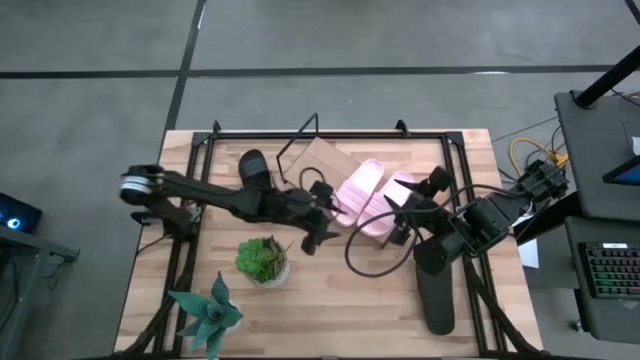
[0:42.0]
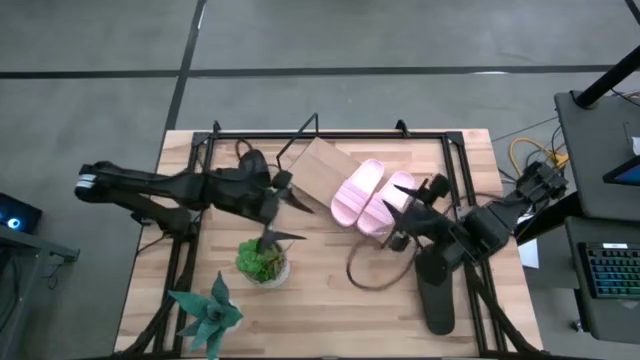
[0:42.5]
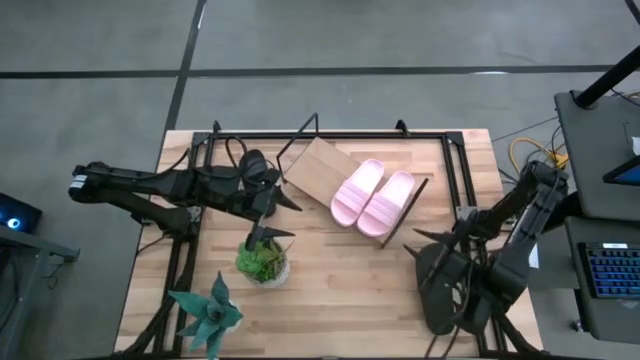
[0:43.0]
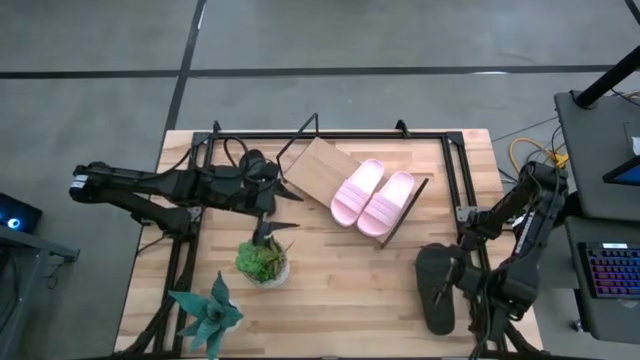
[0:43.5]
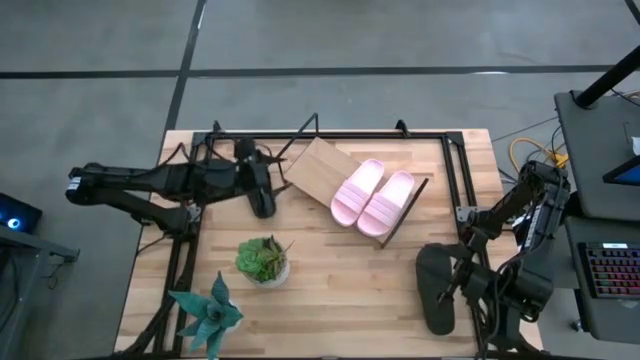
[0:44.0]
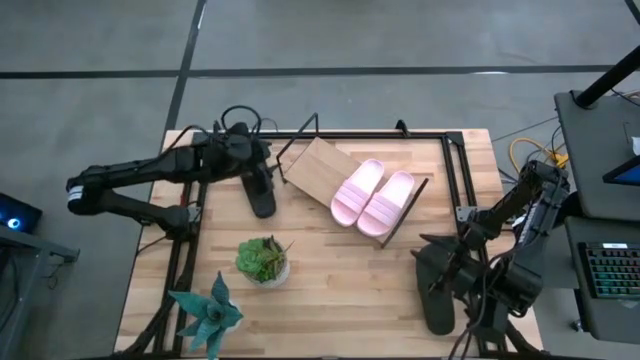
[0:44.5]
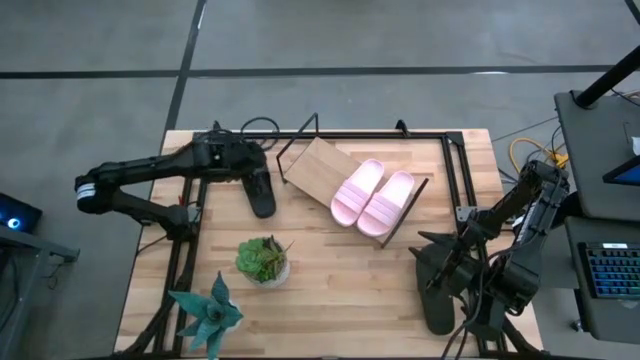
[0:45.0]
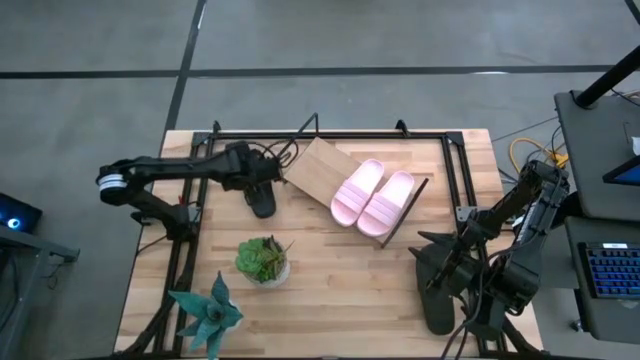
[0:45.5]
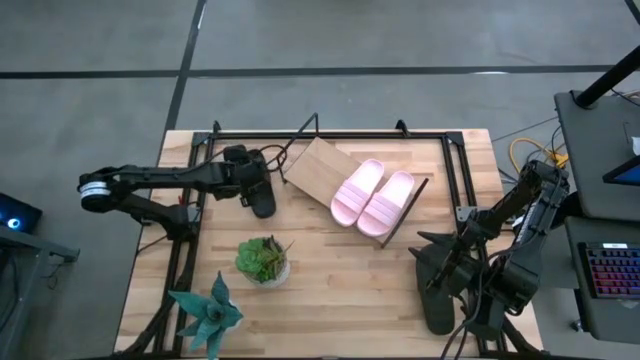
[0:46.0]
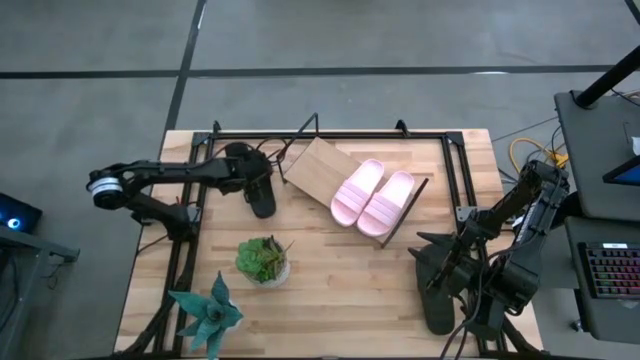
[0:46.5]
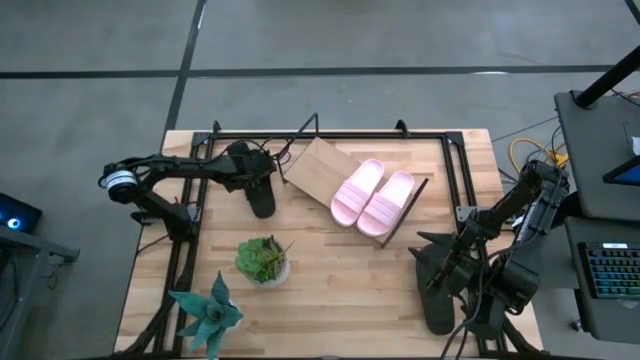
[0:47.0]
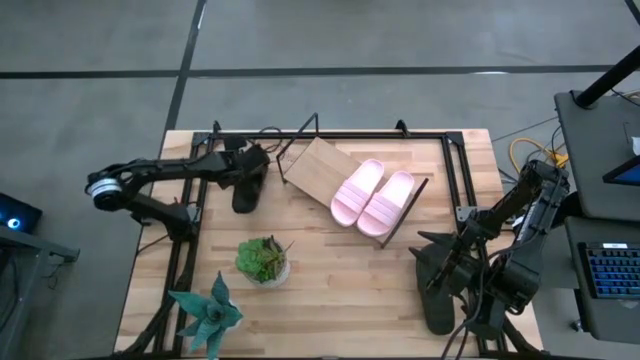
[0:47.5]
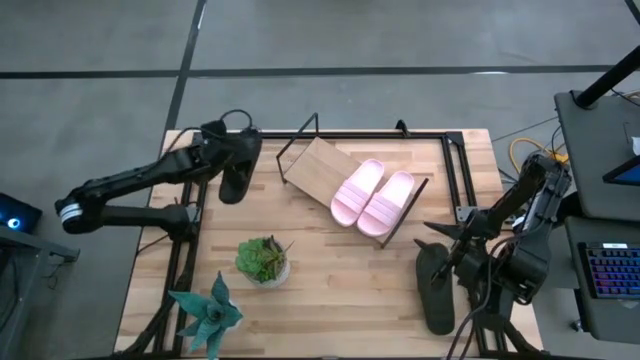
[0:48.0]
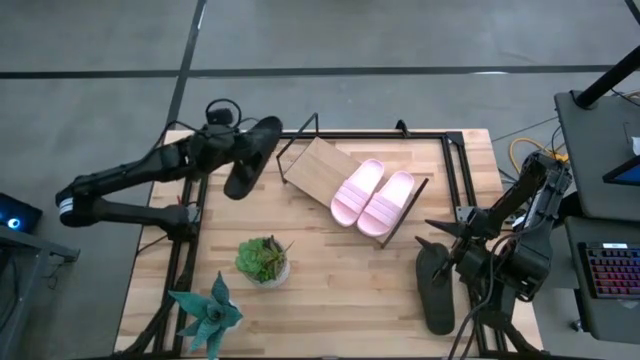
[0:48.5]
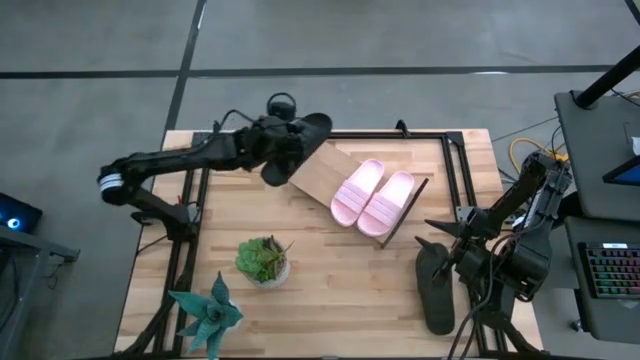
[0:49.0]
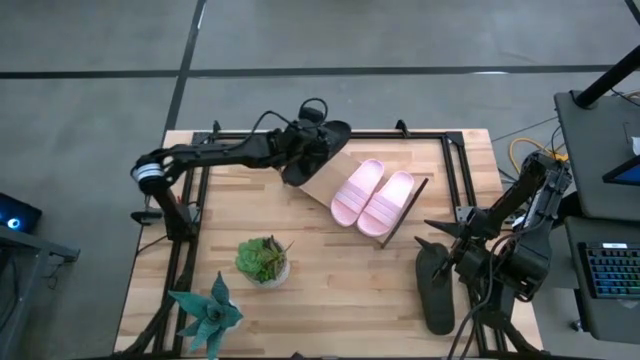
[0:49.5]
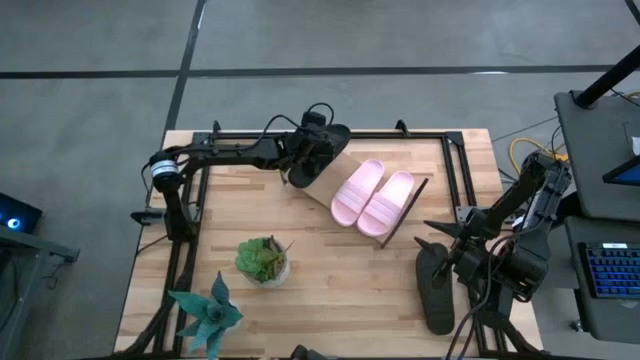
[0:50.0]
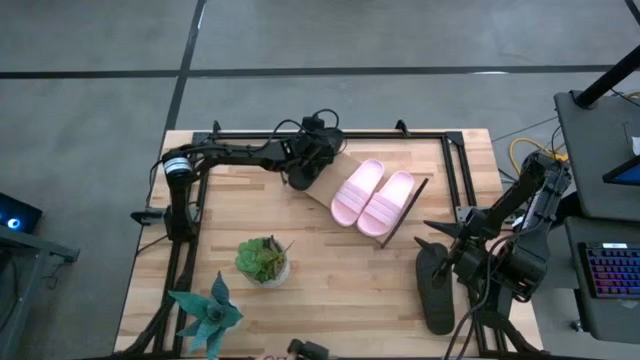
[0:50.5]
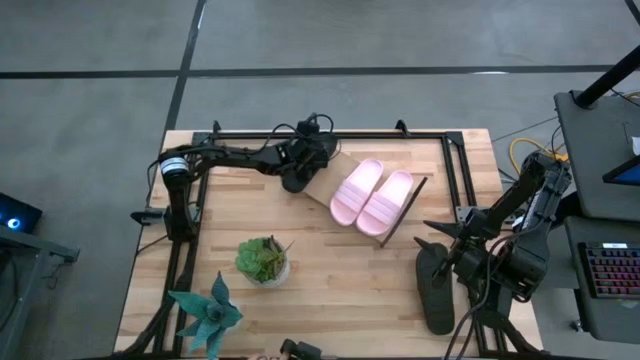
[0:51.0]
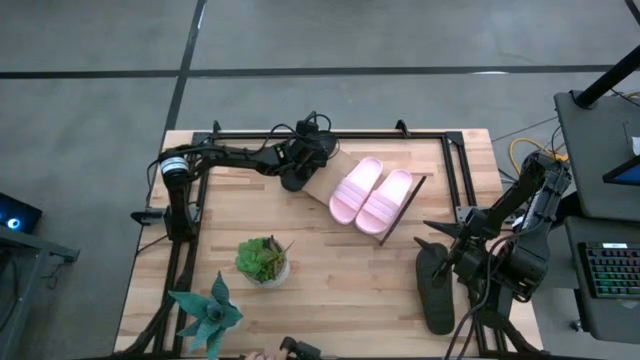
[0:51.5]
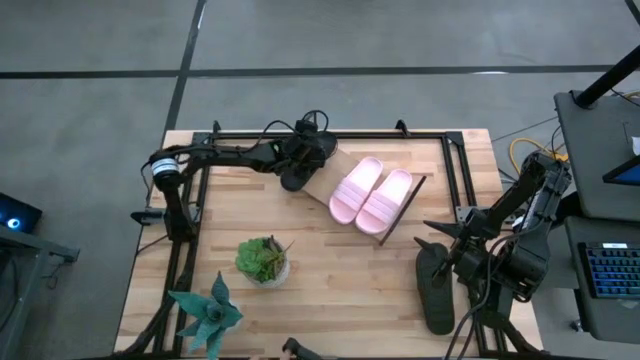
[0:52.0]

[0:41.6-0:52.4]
Task: Pick and place slides into the shelf
Put the top black slide on the shelf

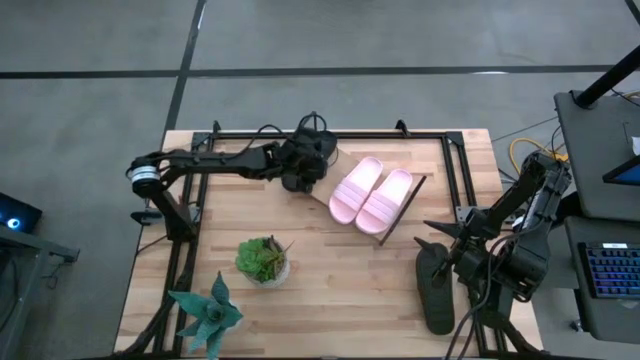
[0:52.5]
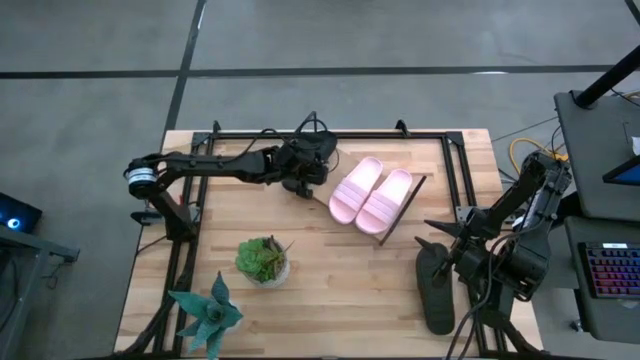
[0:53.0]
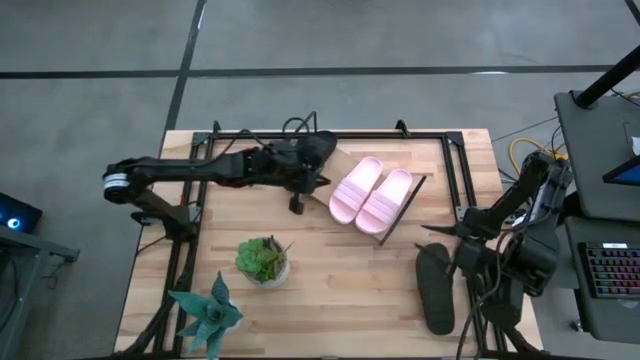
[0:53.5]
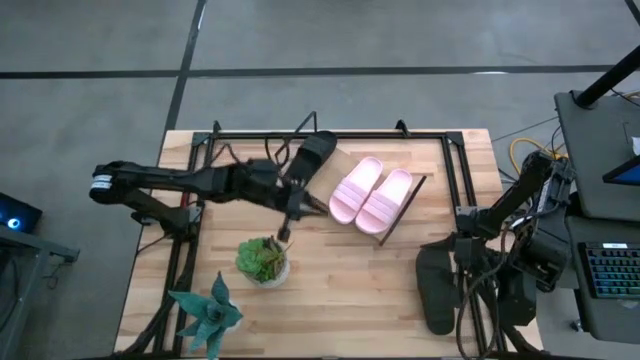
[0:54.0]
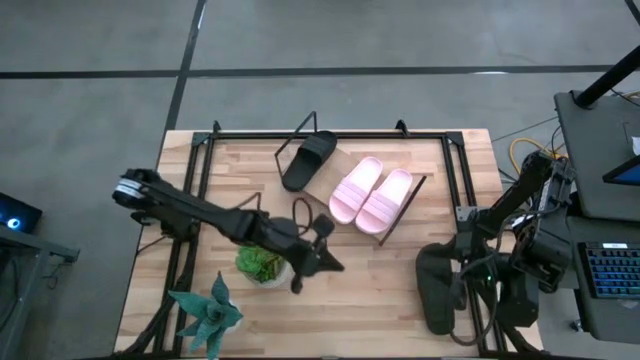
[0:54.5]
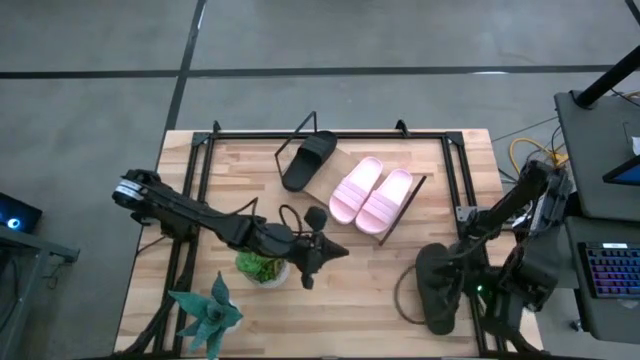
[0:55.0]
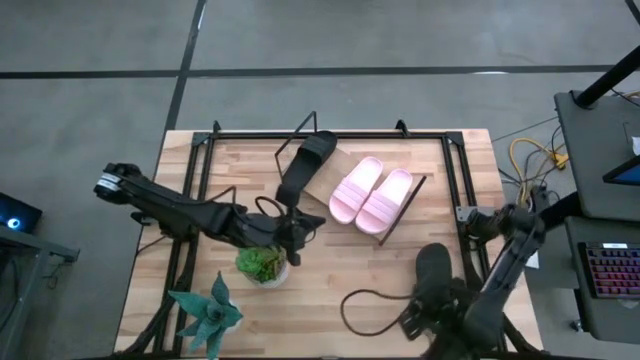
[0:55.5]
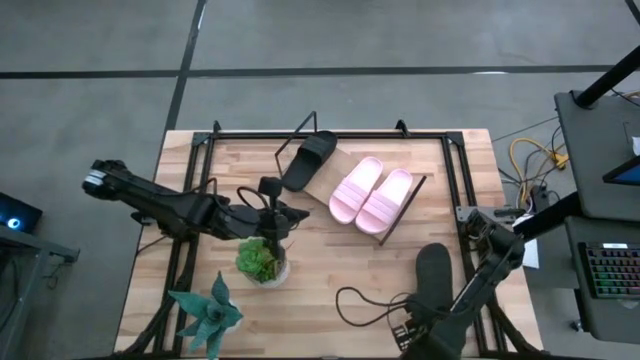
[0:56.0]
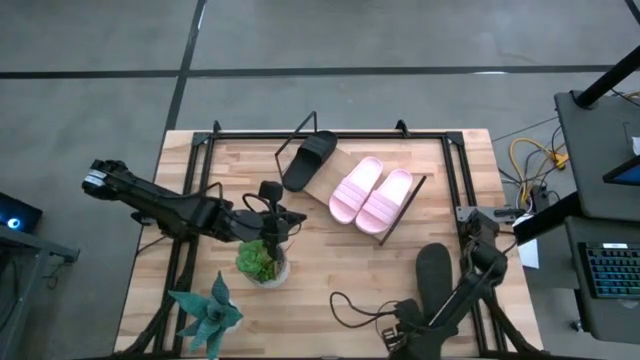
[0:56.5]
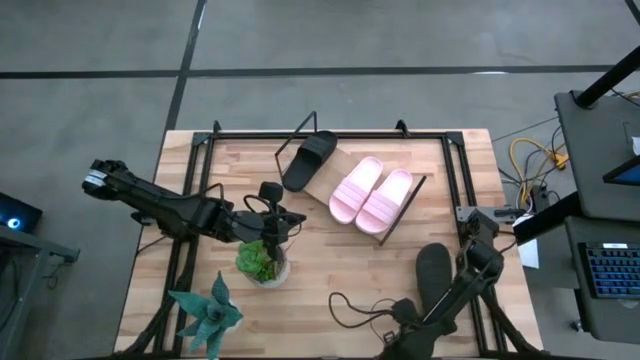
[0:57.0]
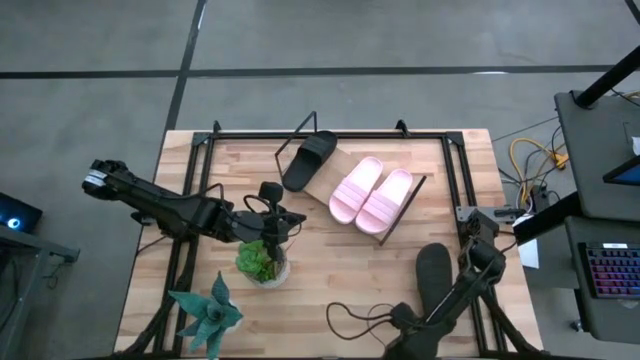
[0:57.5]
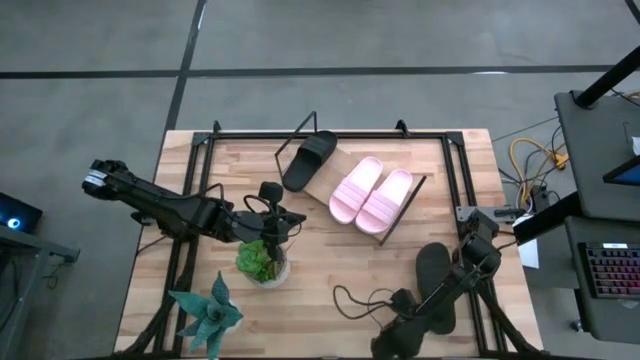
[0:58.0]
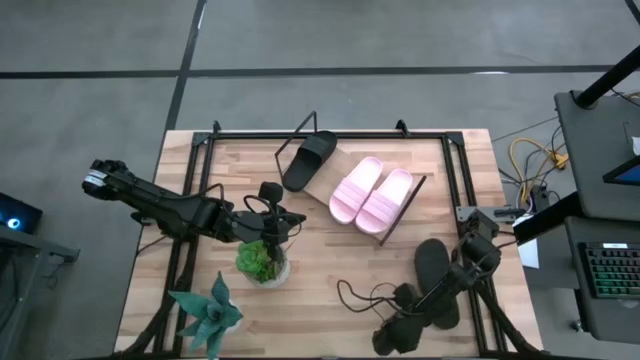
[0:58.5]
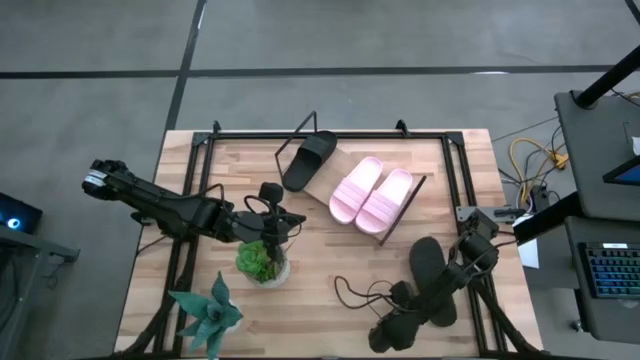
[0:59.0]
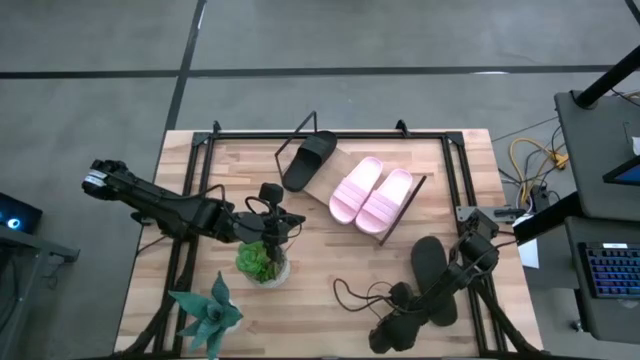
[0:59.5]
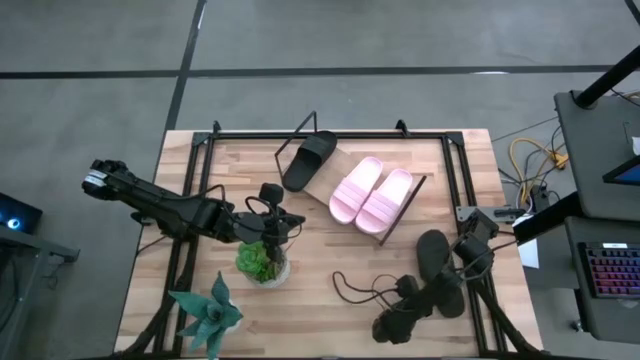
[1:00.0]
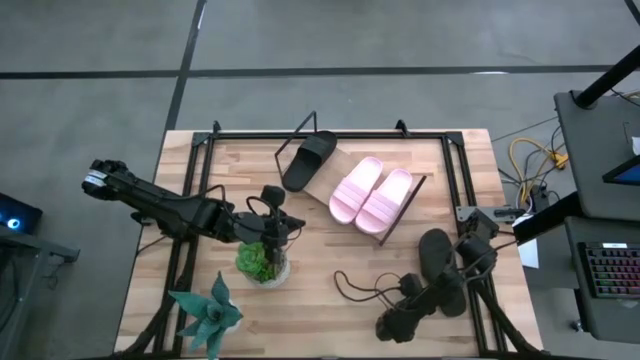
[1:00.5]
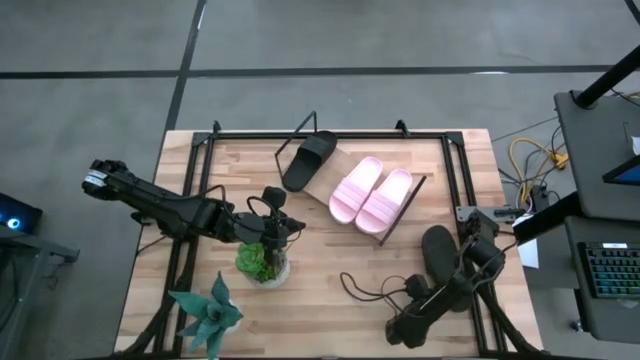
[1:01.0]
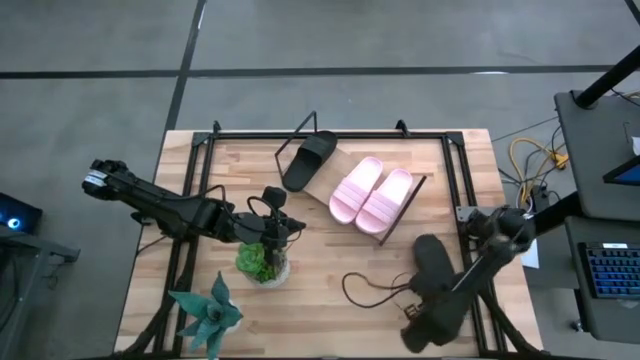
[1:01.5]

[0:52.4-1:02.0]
Put the black slide on the shelf
